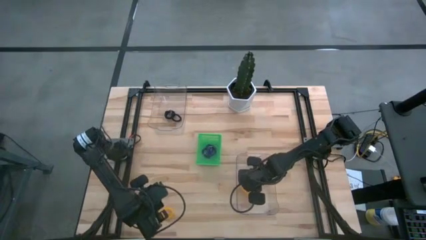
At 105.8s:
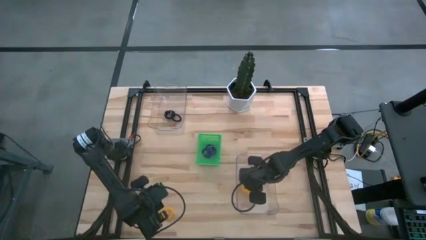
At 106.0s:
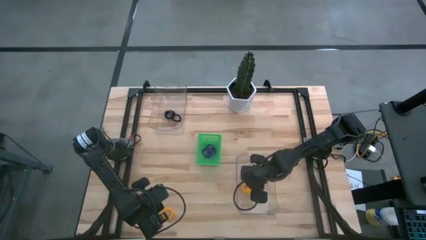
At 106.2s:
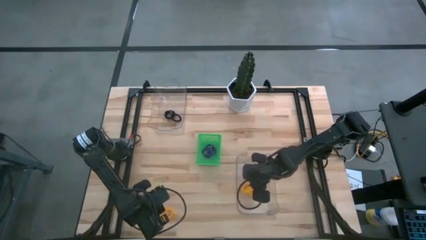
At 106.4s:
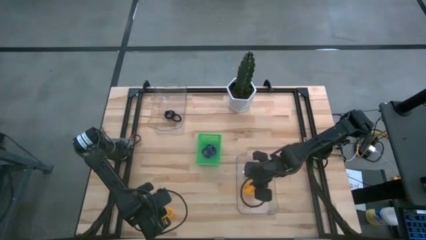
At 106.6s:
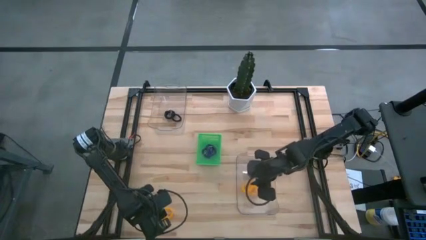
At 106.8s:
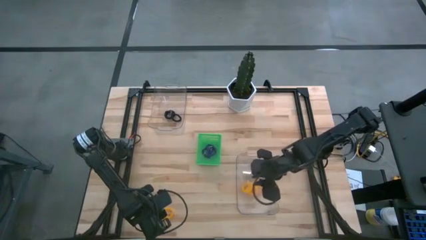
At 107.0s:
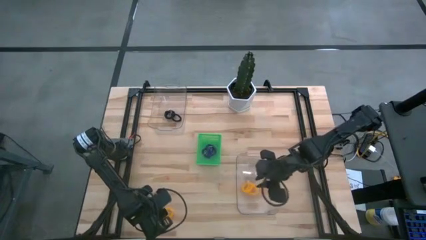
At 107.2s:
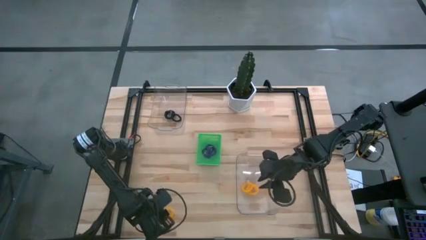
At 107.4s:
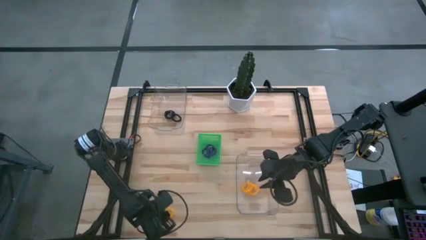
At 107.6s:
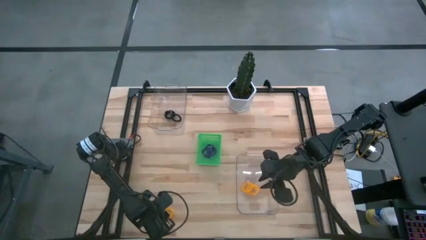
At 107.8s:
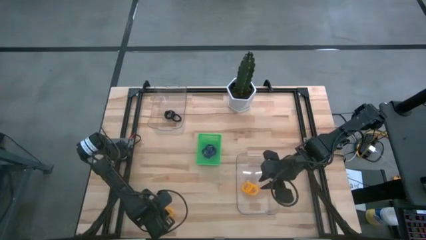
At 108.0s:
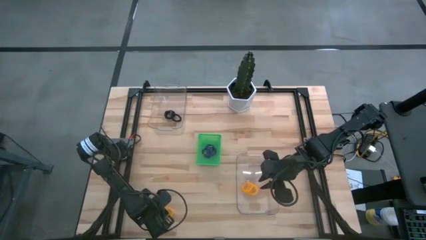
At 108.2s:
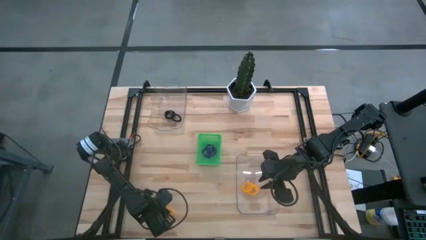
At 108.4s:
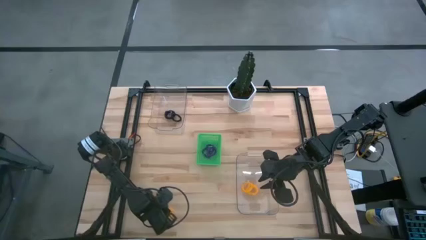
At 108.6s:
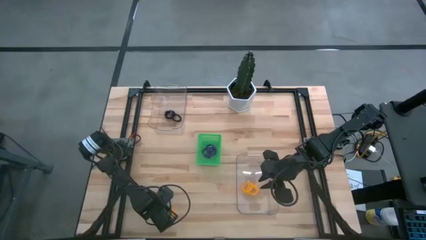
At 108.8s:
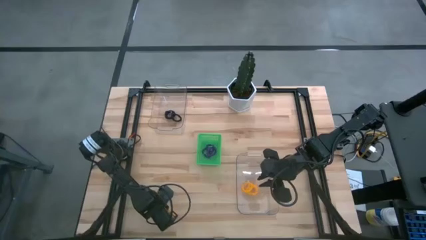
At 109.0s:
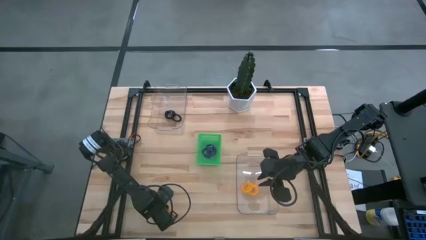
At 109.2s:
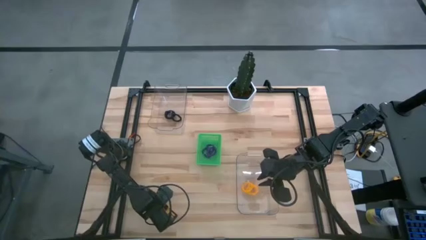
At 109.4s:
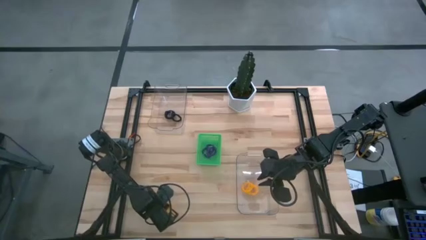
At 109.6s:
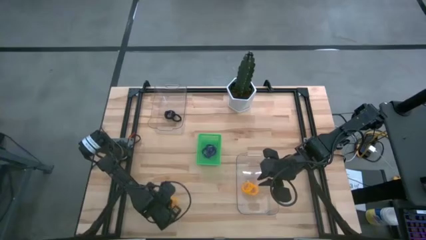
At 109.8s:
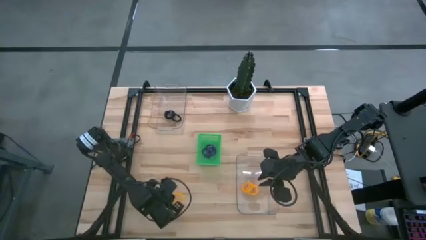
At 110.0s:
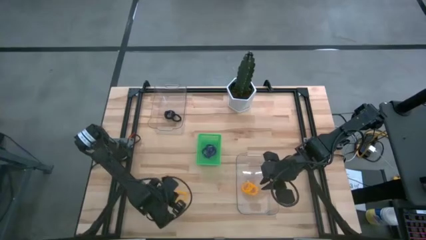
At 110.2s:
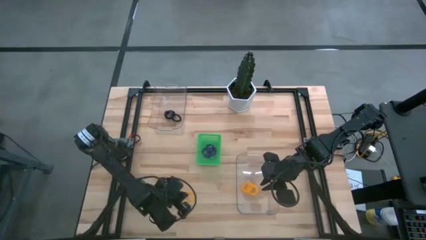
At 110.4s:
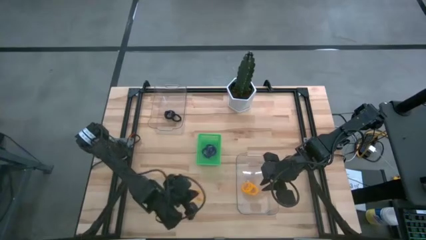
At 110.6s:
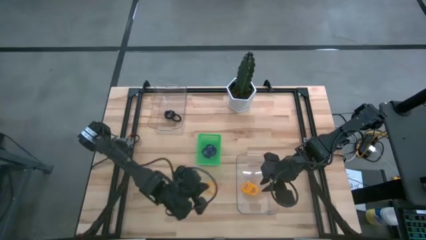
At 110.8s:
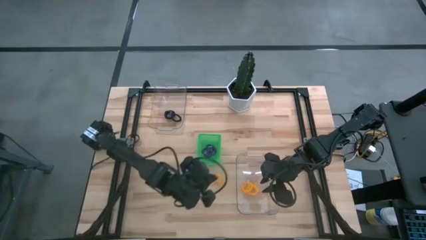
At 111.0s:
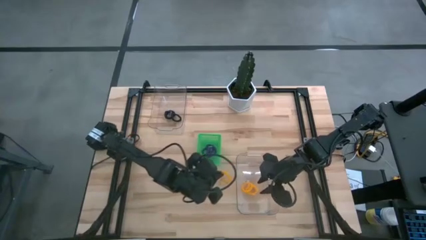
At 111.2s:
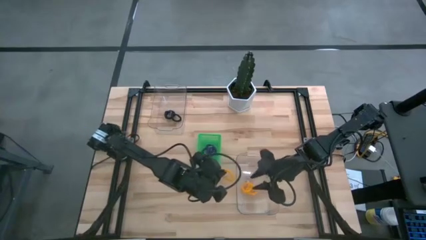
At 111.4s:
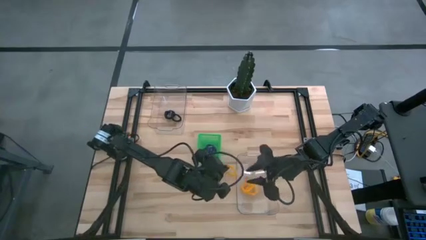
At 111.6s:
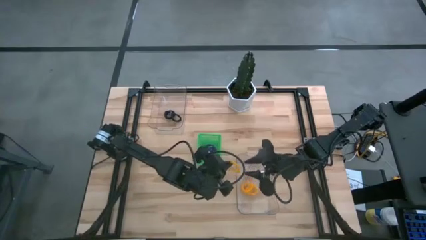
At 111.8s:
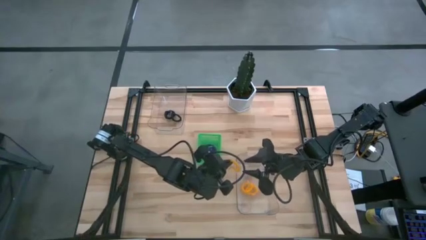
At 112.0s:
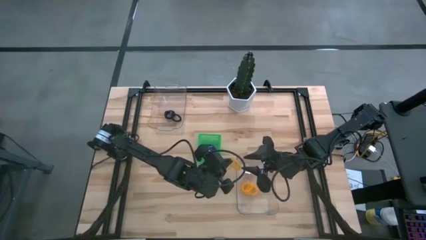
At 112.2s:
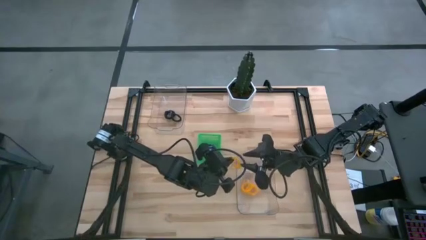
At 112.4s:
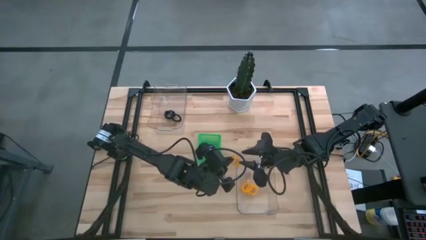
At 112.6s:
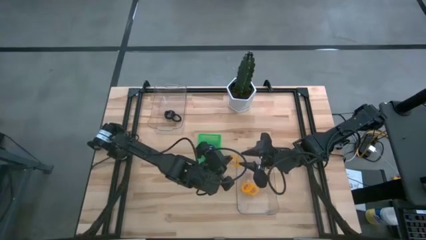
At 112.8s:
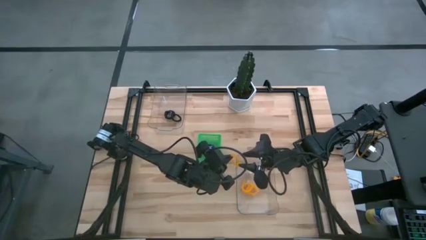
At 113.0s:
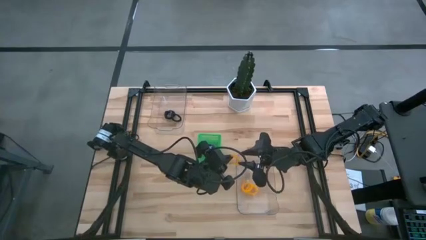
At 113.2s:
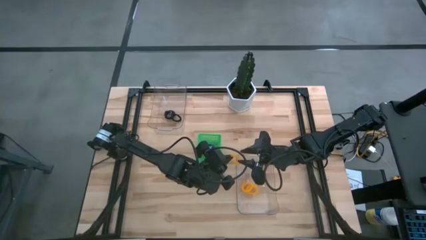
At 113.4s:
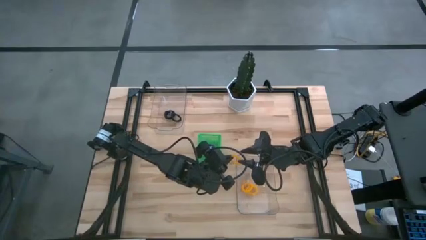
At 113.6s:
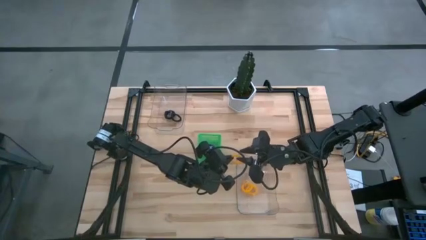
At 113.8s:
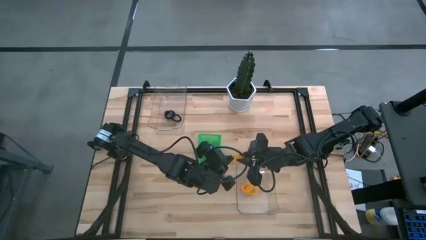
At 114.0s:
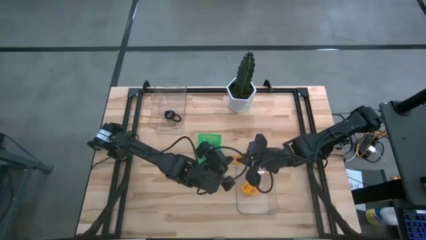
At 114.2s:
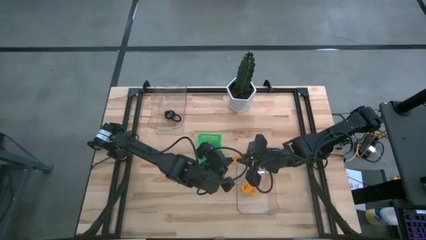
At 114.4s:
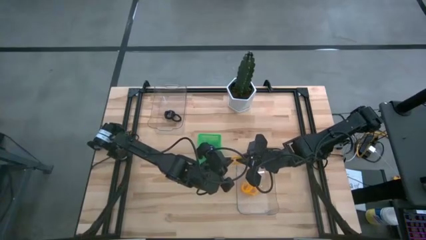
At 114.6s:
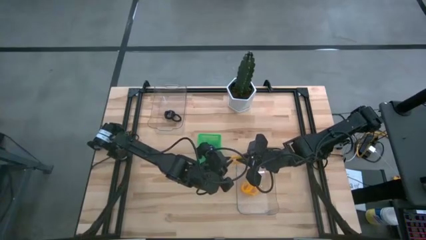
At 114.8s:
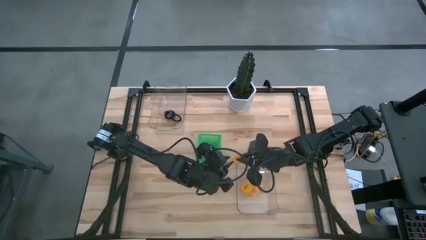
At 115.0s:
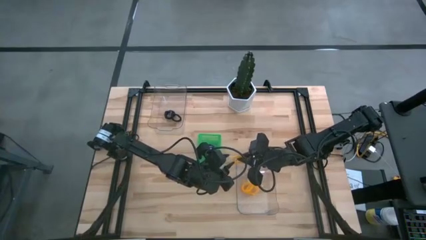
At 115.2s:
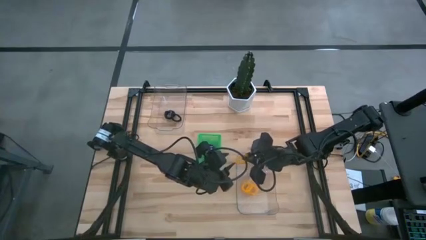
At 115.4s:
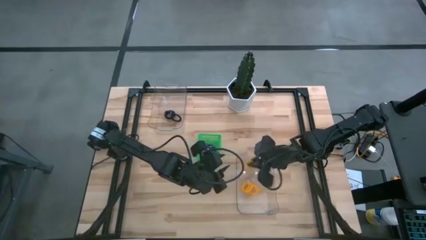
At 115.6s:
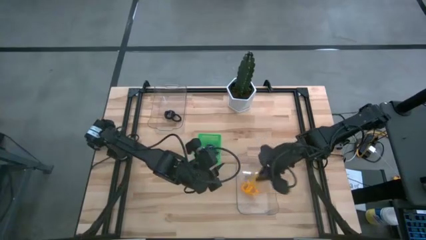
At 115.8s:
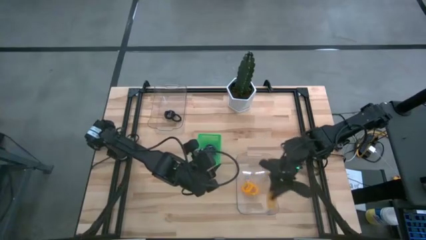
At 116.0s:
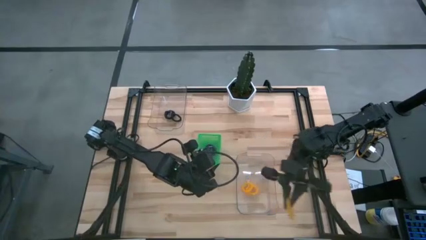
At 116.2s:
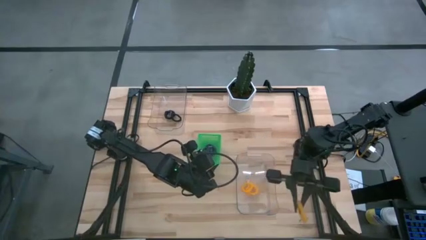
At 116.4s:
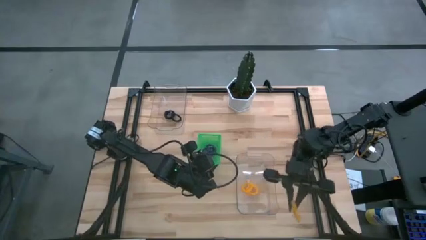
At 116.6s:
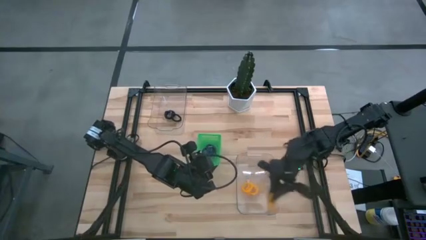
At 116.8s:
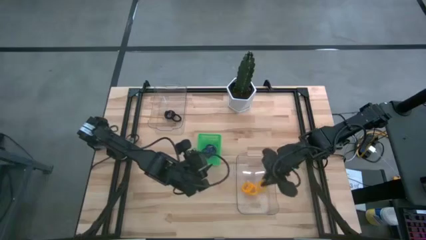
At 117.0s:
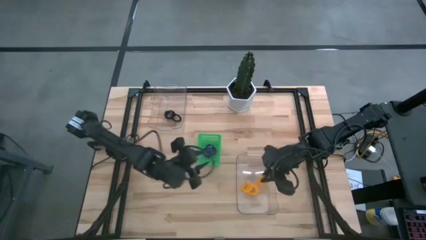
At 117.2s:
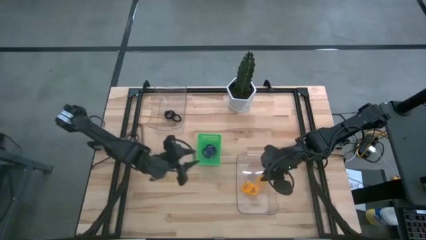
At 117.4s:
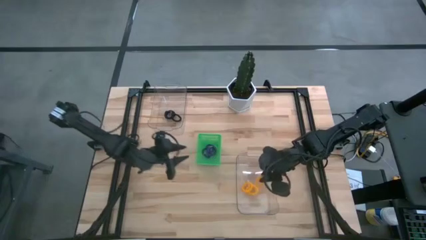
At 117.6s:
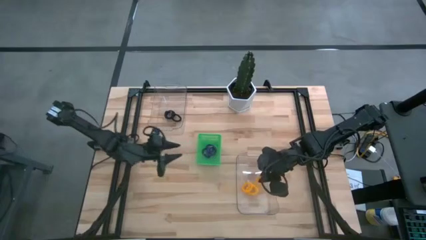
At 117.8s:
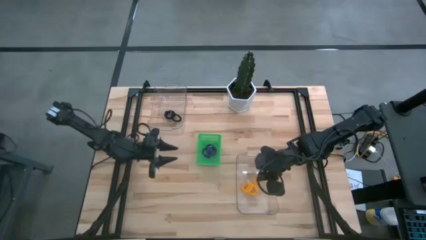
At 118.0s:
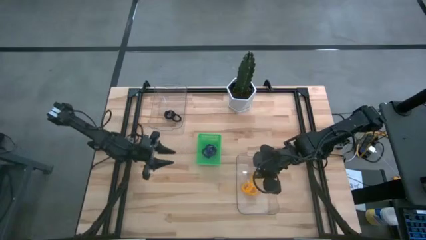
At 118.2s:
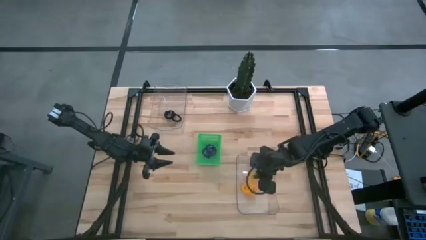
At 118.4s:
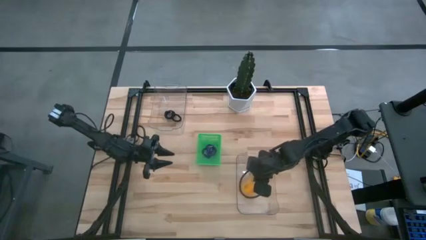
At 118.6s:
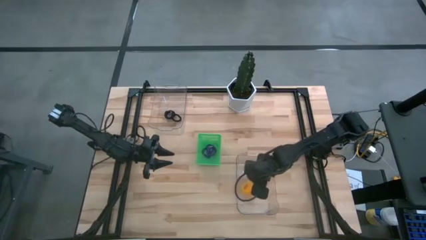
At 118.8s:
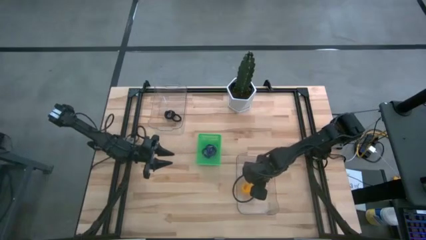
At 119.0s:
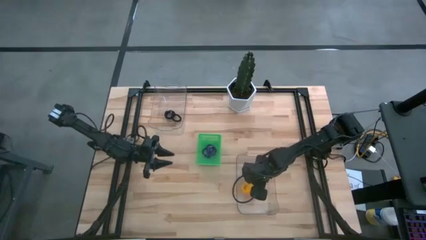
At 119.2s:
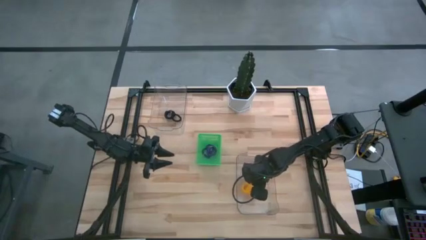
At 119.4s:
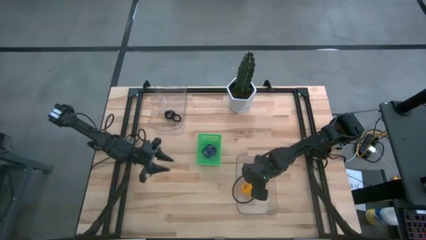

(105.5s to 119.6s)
Task: Sort spring keychains
Put the yellow spring keychain into the bottom transparent bin

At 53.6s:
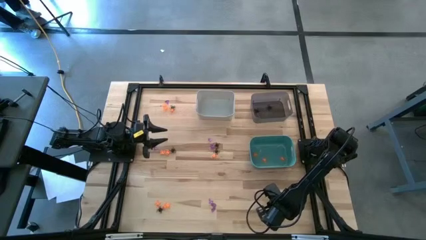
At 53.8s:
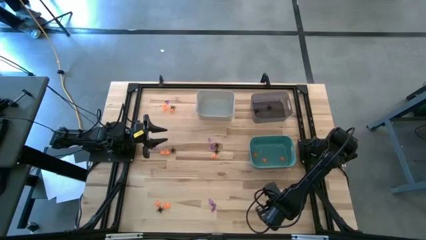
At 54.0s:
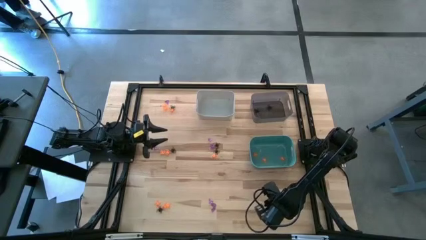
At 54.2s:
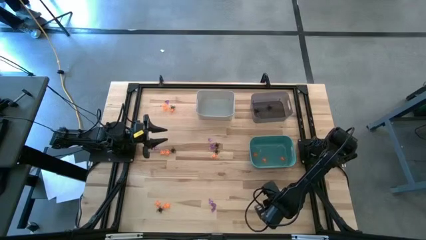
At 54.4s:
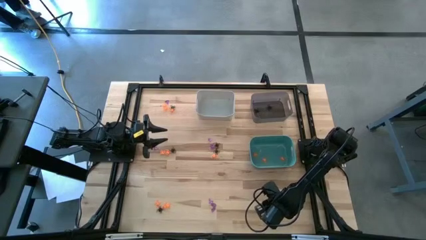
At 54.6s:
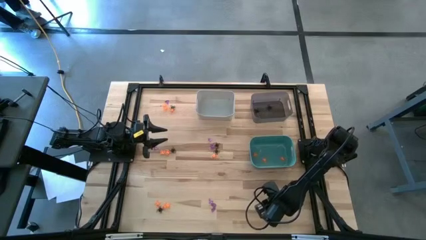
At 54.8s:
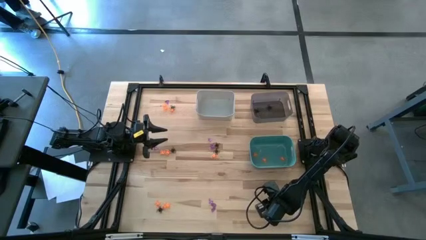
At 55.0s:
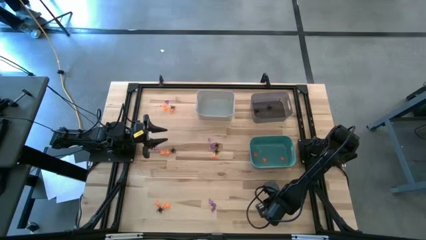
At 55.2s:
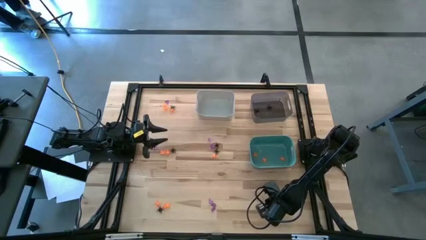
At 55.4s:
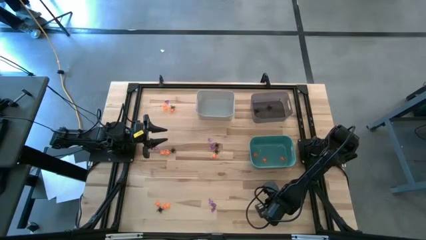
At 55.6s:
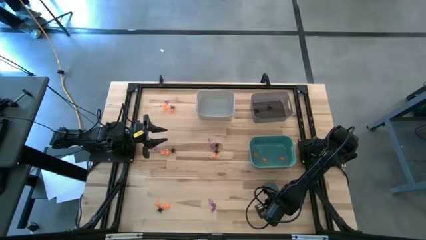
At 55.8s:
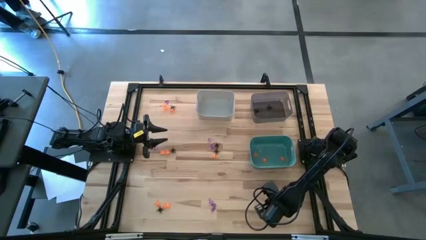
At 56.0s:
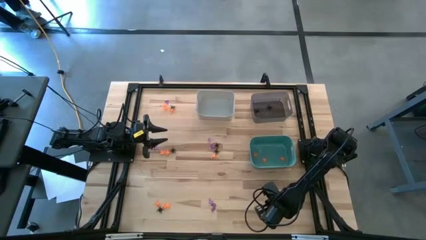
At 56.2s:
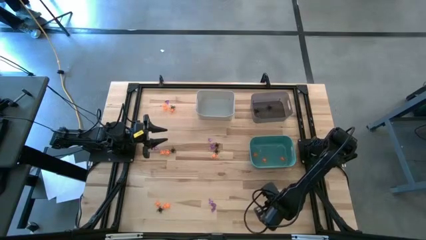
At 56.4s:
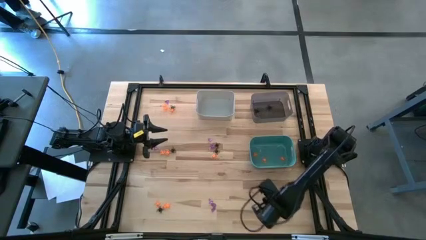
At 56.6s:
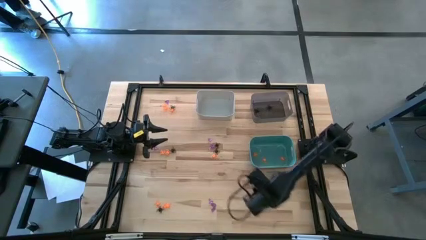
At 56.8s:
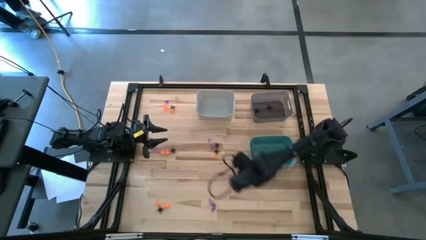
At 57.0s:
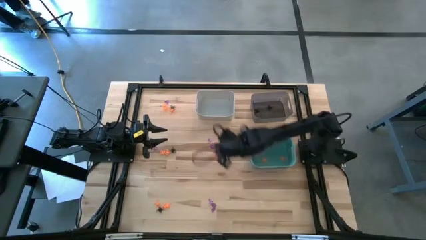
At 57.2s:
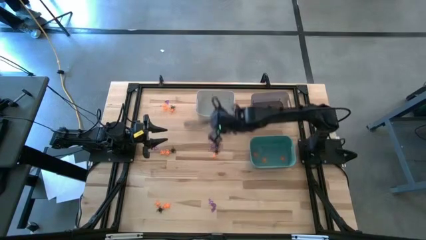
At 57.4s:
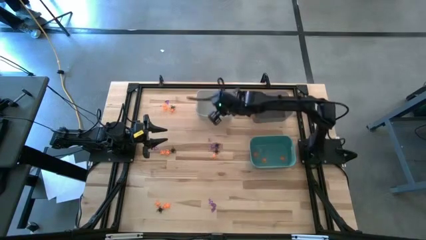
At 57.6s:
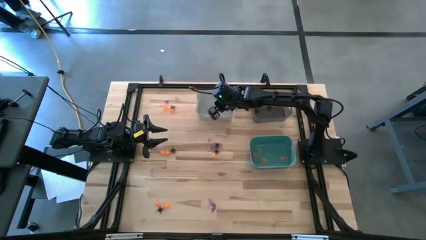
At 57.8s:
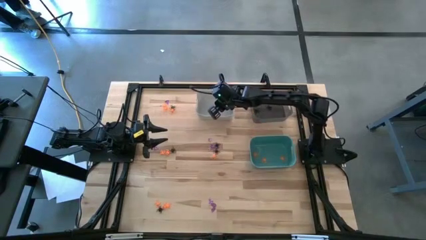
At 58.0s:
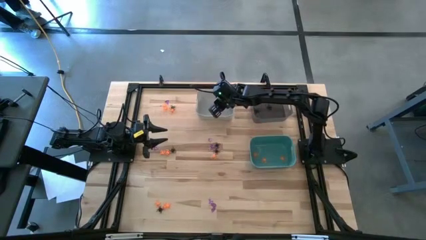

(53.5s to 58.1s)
Task: Sort Halloween decoration
Put the purple witch hat toy into the white bin
